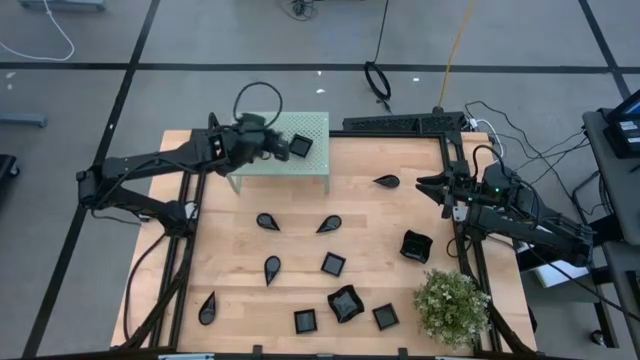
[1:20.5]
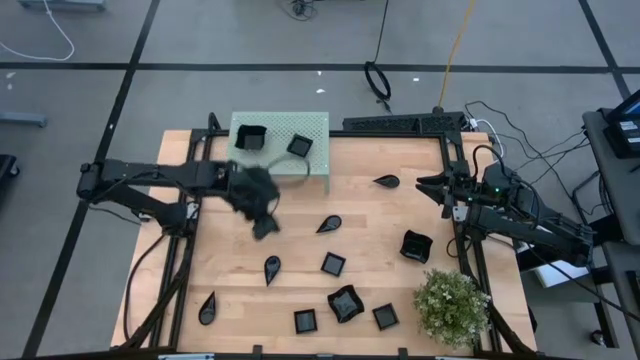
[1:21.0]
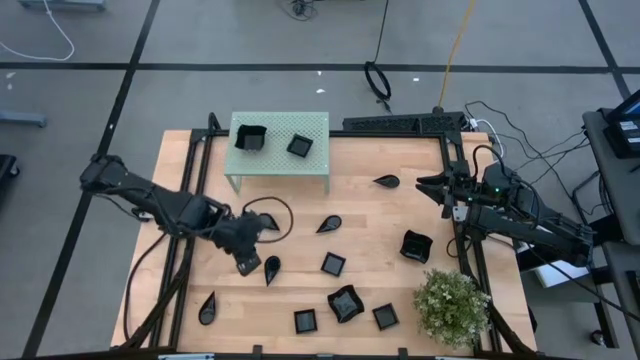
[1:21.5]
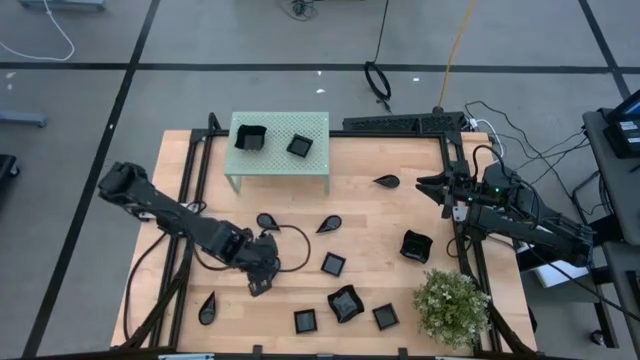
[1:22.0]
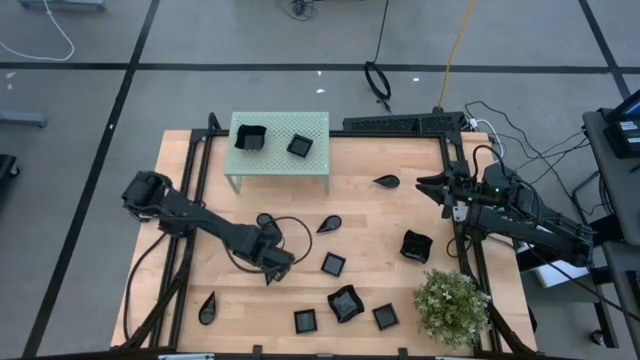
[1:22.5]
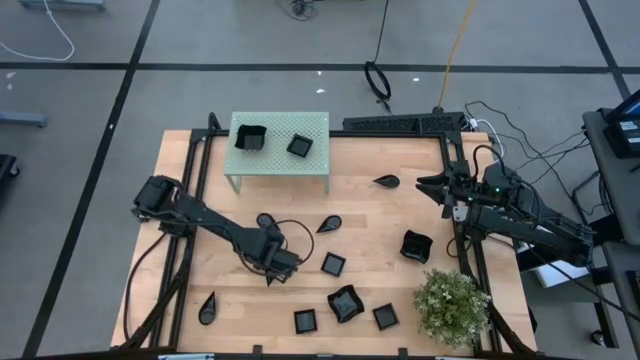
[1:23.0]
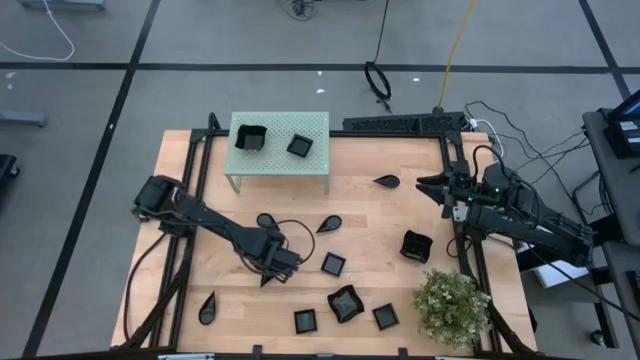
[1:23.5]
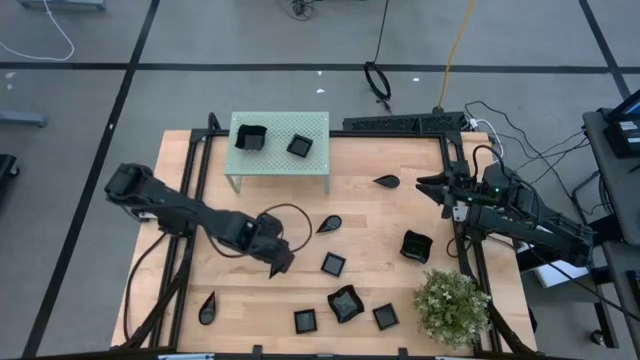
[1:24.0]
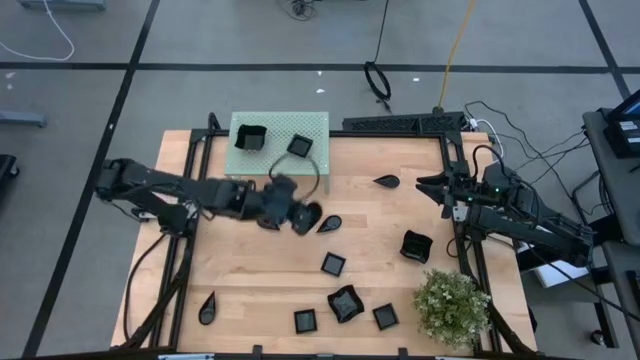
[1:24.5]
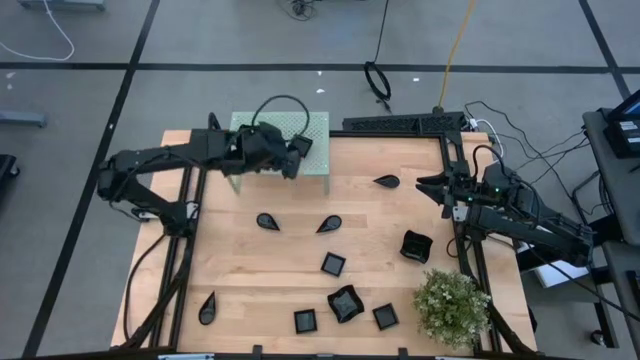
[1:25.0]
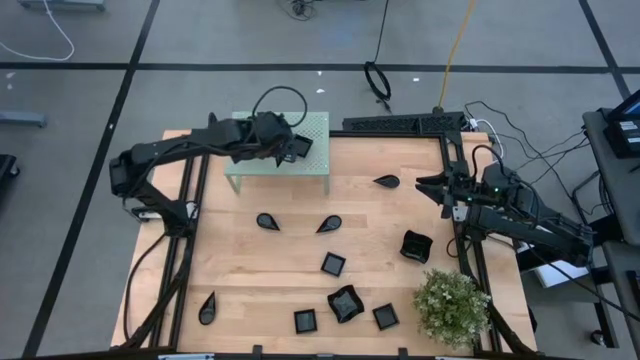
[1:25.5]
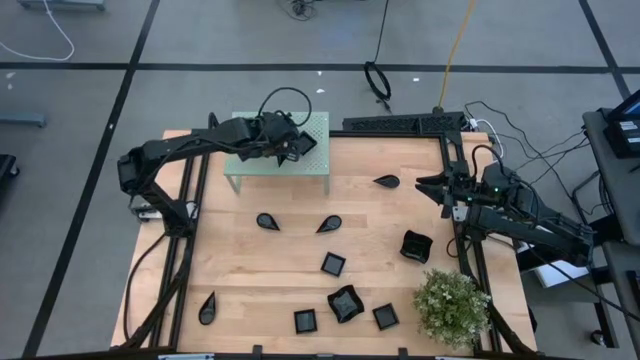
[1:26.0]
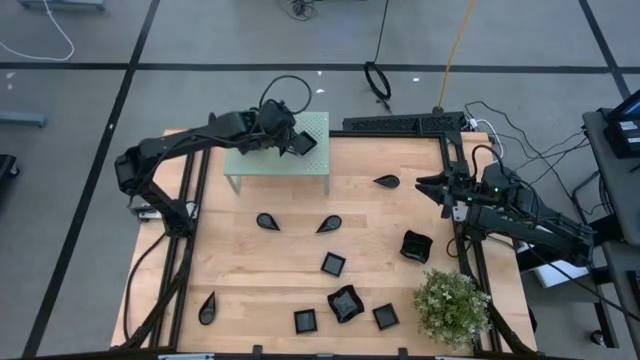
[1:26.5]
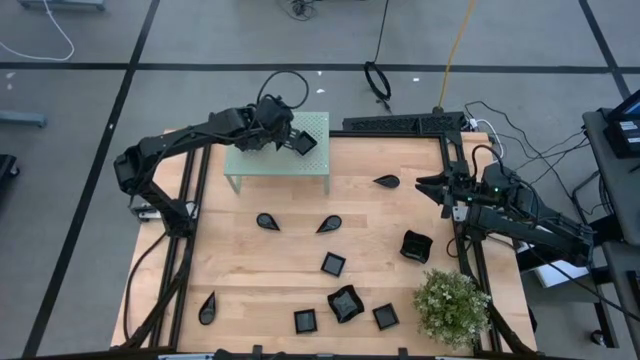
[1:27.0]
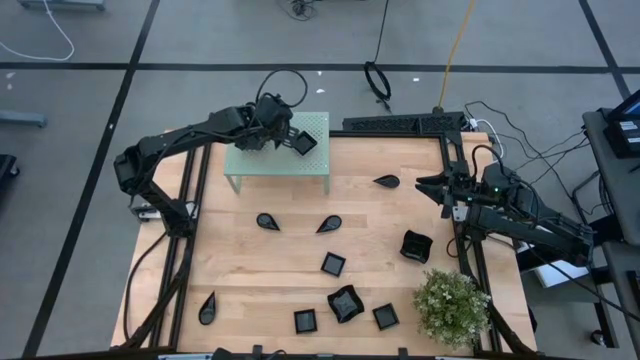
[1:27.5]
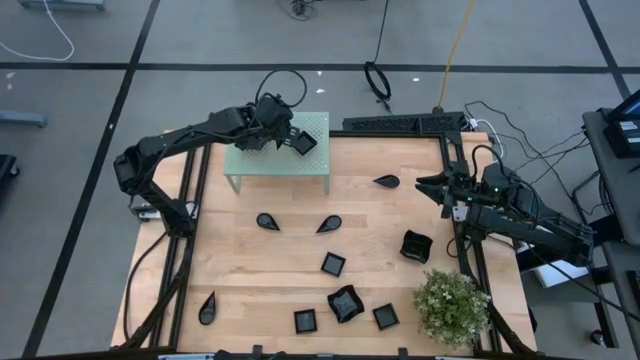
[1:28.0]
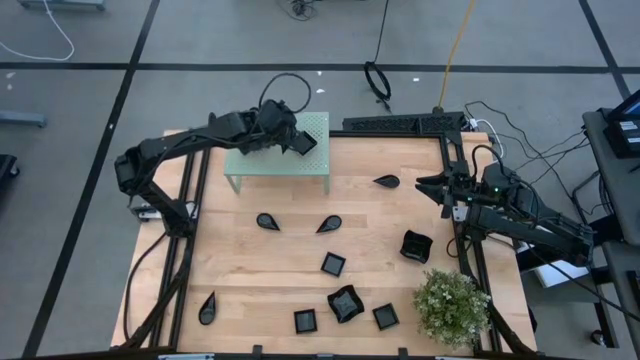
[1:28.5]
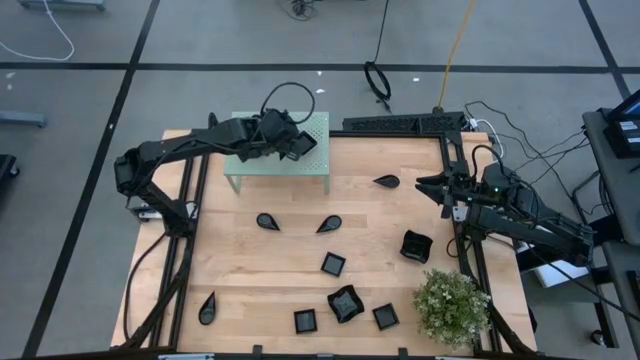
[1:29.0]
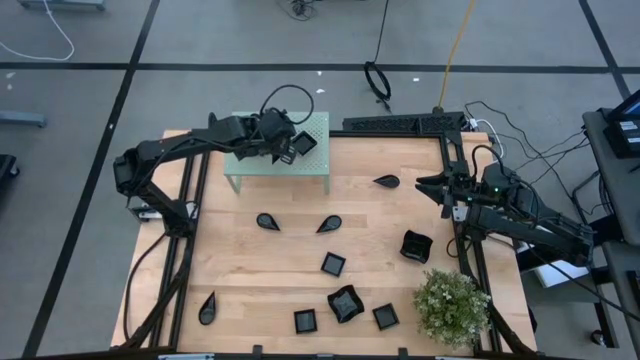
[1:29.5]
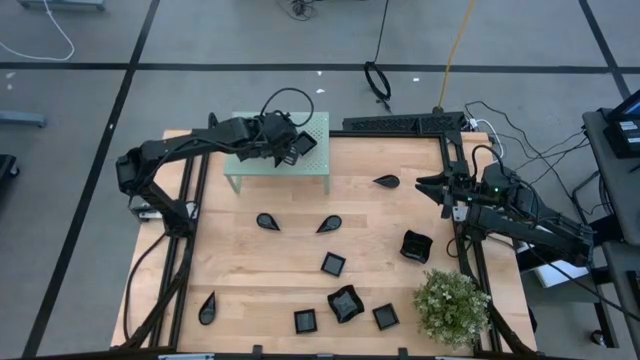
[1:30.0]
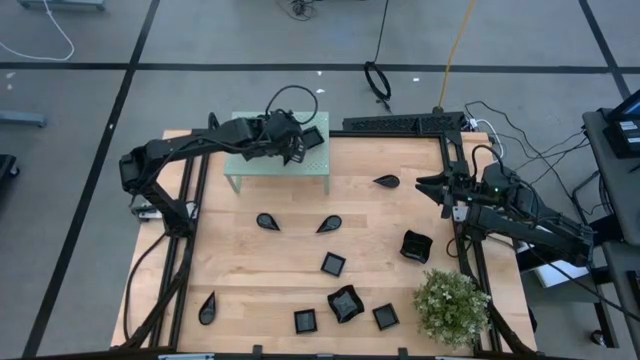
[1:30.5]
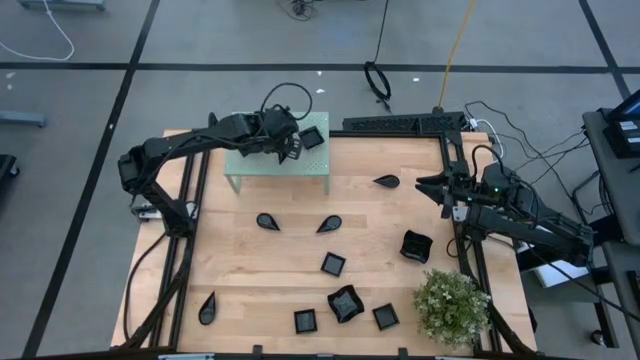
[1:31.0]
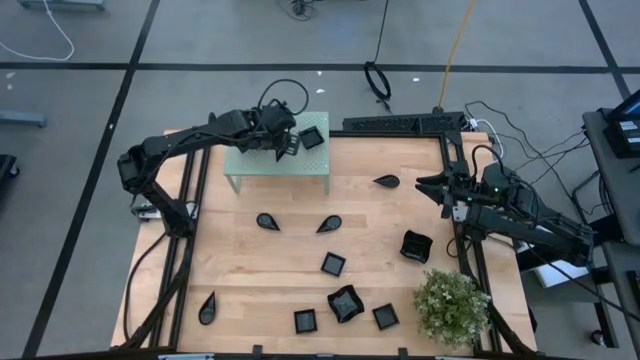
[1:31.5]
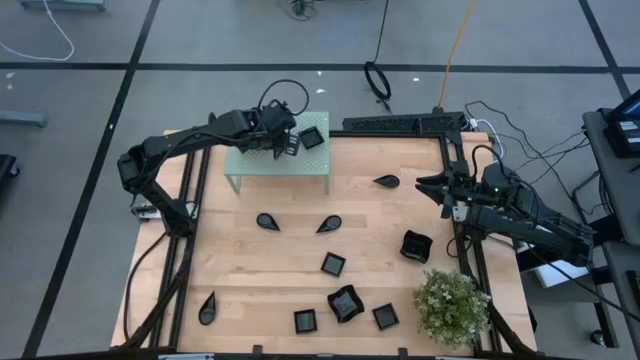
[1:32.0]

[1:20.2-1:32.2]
Task: Pick & Place Mini shaped plates
Put the drop shaped plate on the shelf

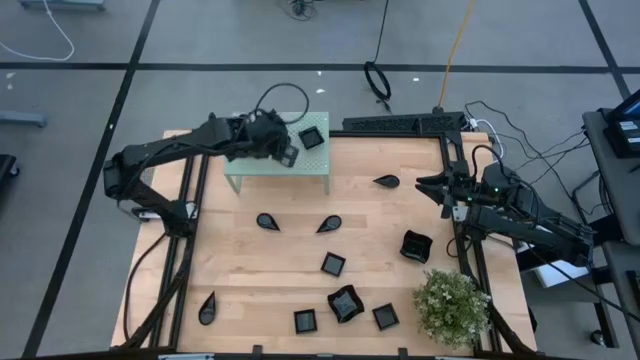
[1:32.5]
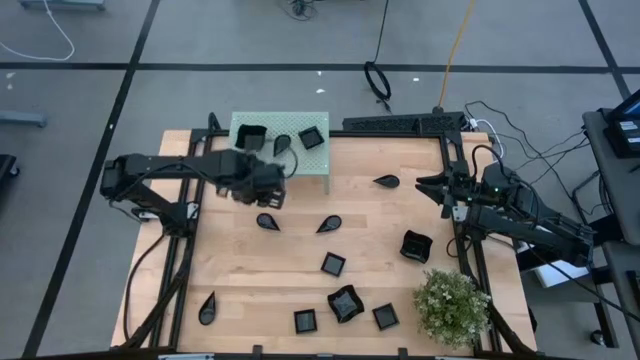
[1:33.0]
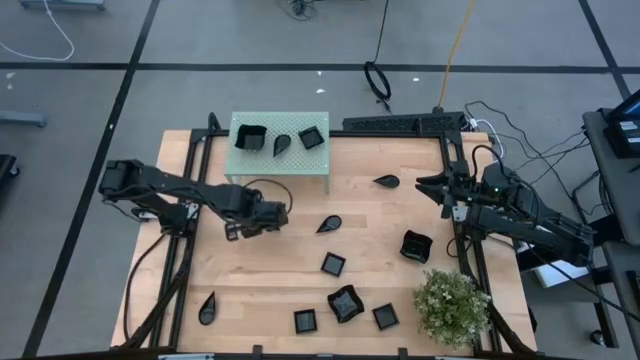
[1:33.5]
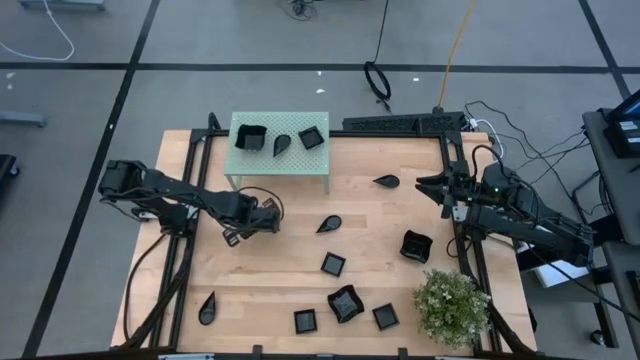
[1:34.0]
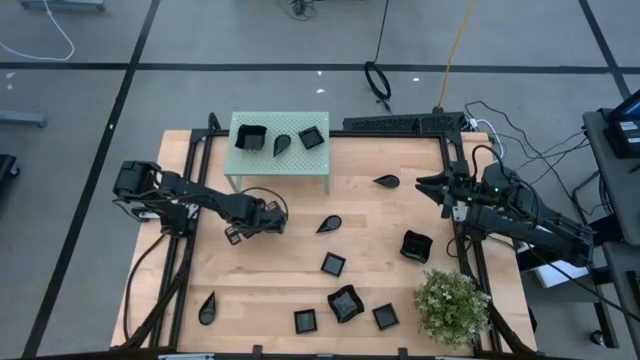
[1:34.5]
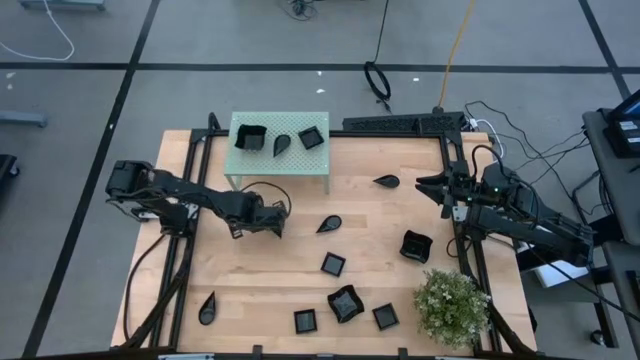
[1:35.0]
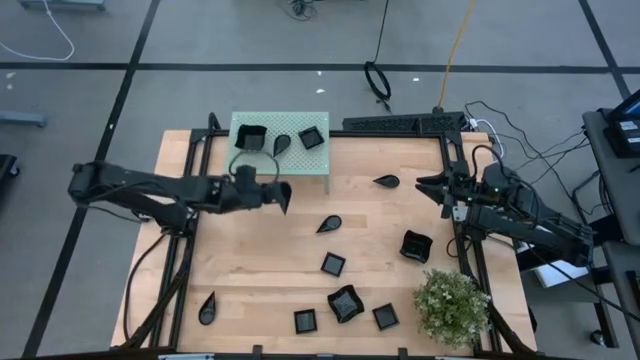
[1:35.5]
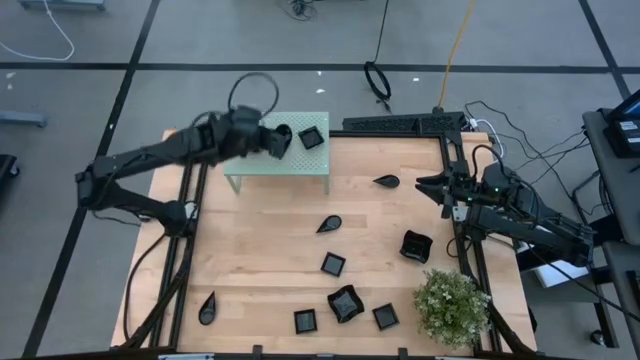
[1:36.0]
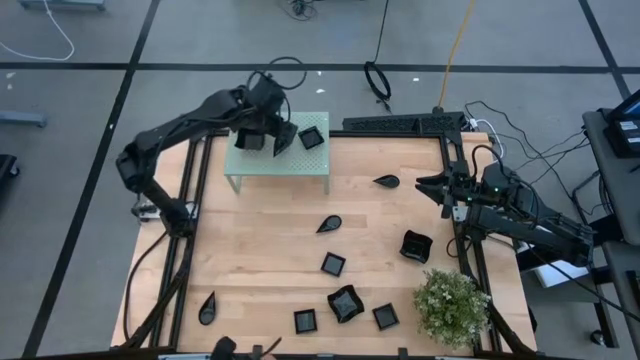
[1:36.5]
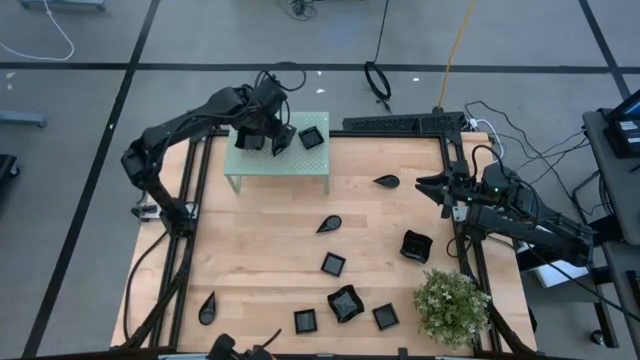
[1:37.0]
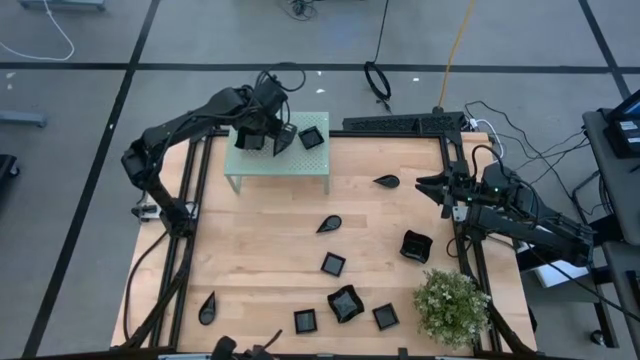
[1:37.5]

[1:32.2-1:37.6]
Stack the drop shaped plate on top of the drop shaped plate on the shelf

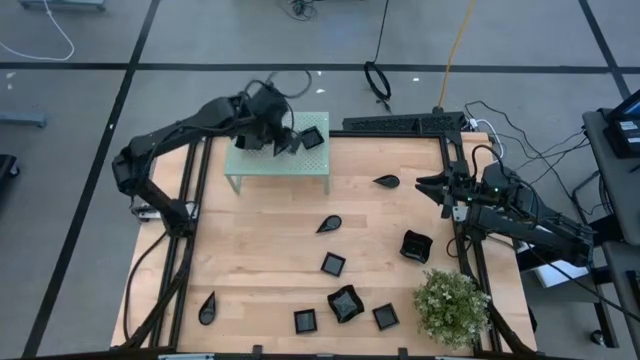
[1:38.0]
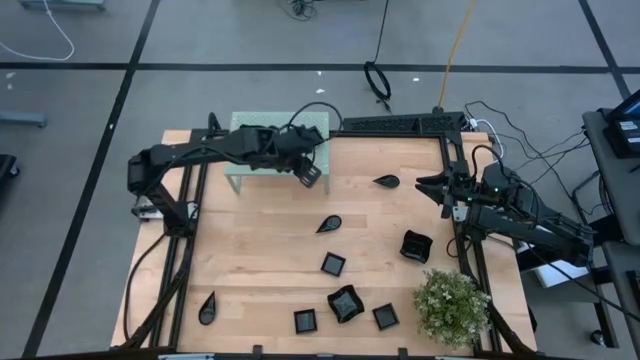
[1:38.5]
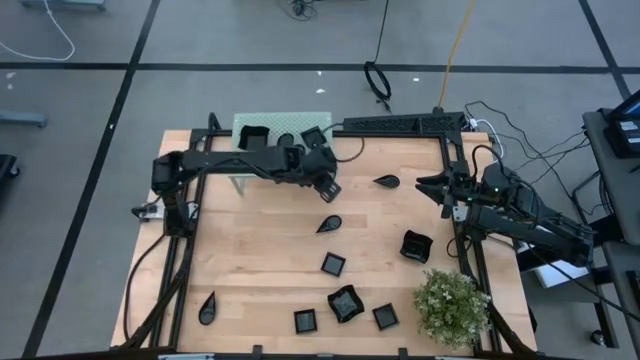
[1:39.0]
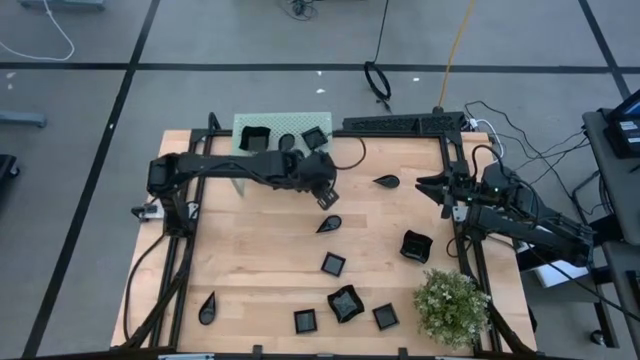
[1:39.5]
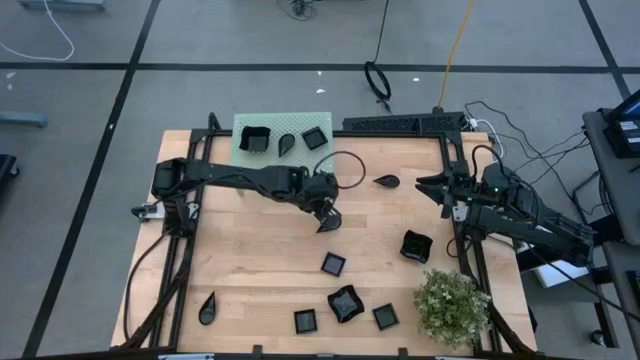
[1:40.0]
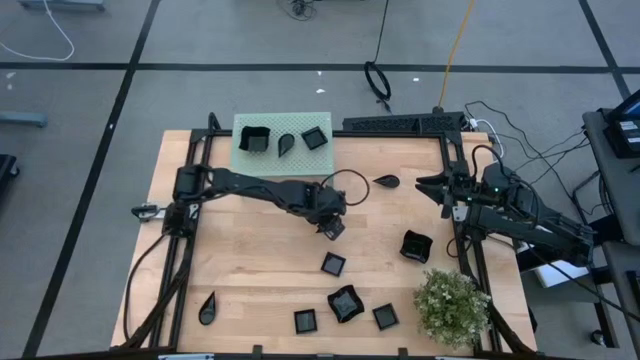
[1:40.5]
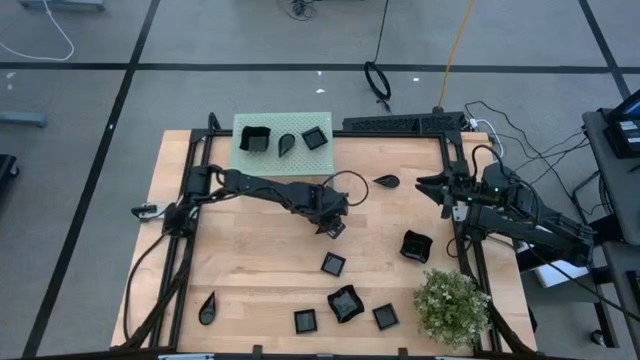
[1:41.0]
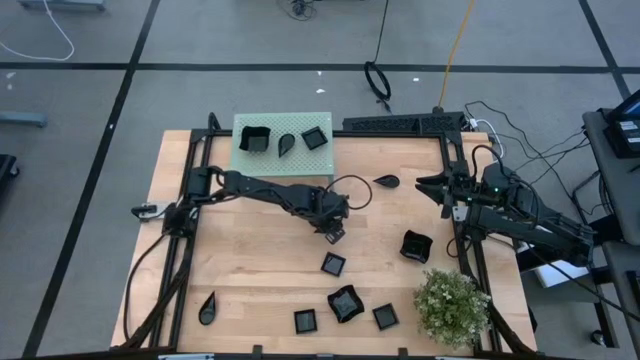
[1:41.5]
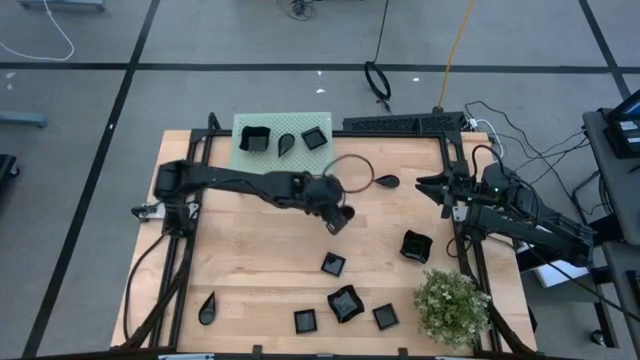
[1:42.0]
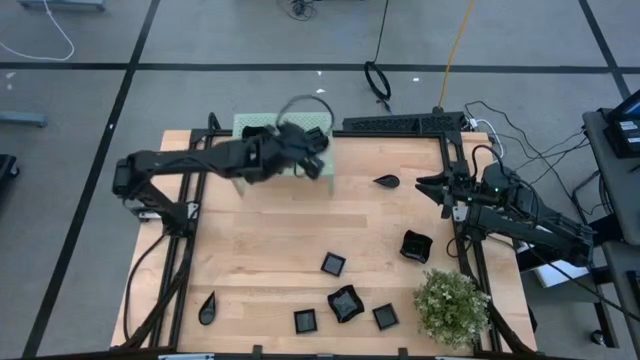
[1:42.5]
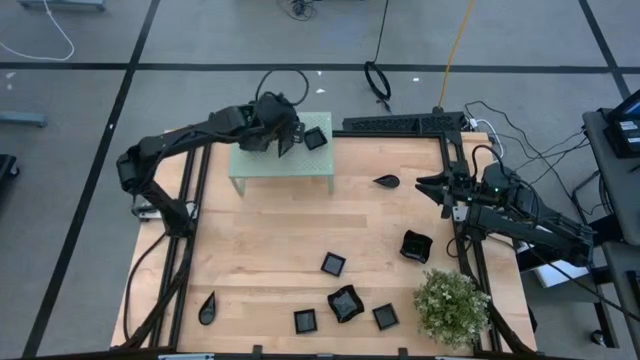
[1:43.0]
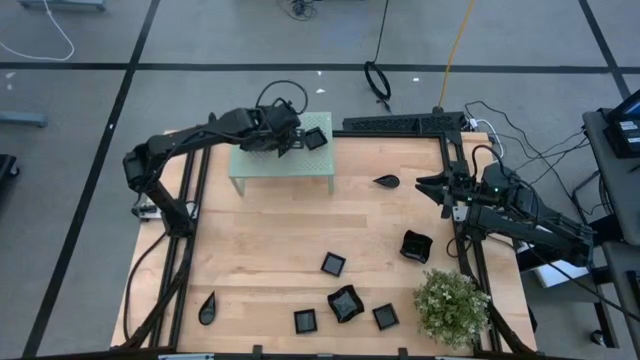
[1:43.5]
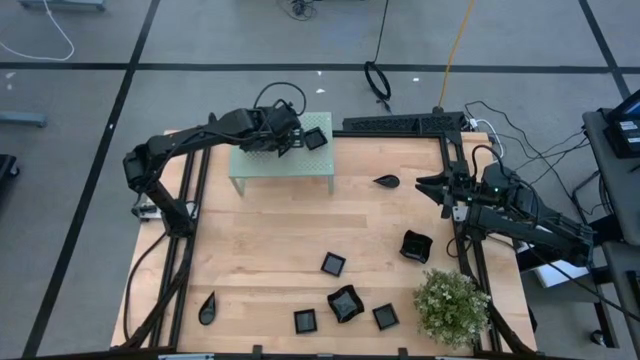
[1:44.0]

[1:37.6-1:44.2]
Stack the drop shaped plate on top of the stacked drop shaped plates on the shelf
